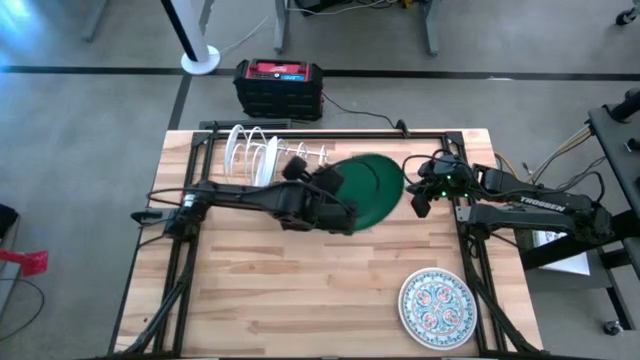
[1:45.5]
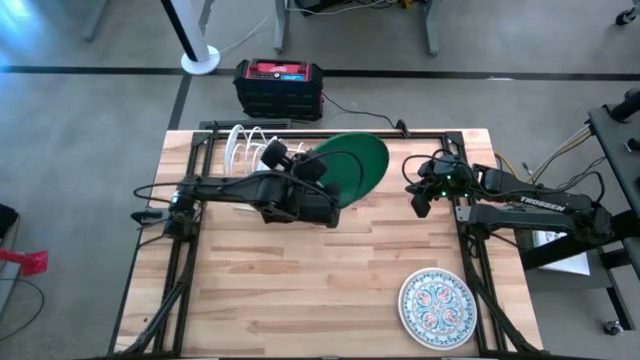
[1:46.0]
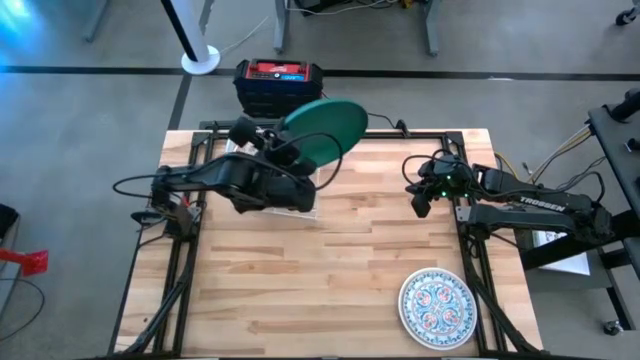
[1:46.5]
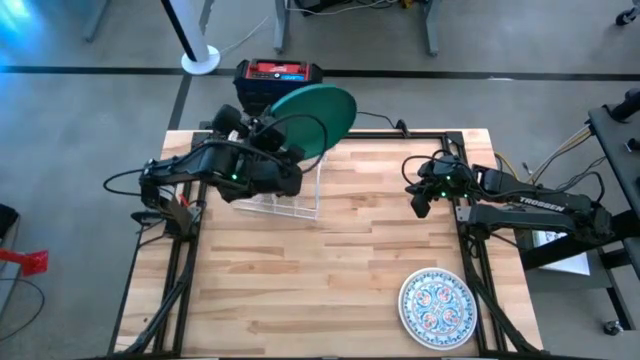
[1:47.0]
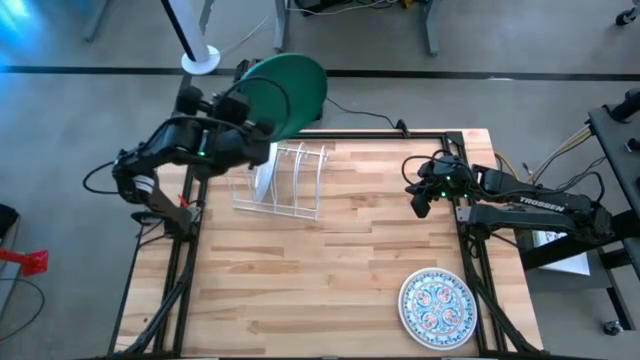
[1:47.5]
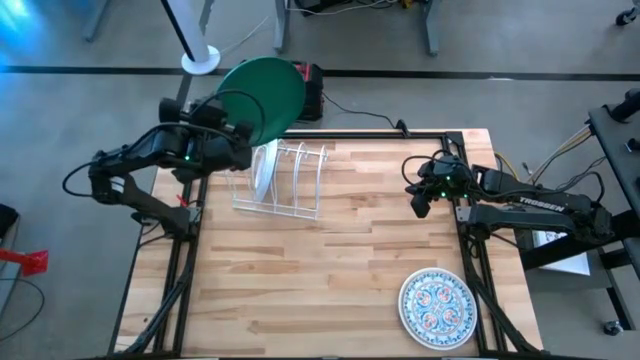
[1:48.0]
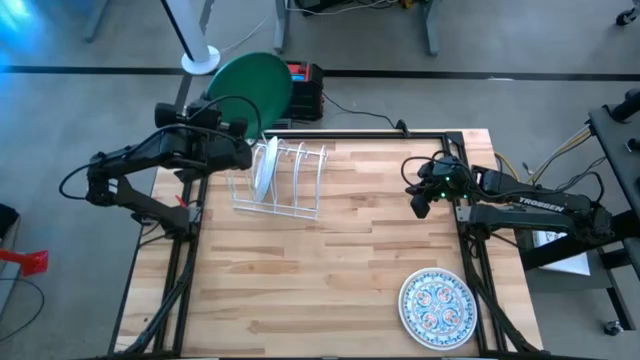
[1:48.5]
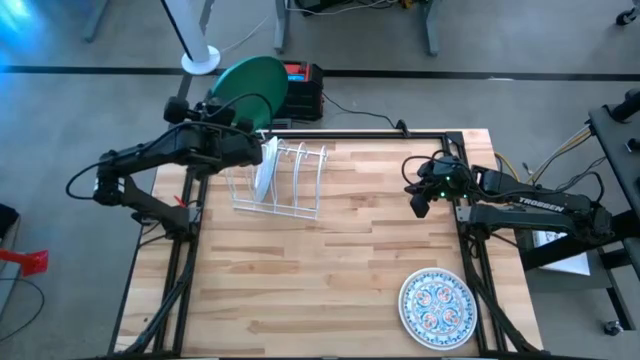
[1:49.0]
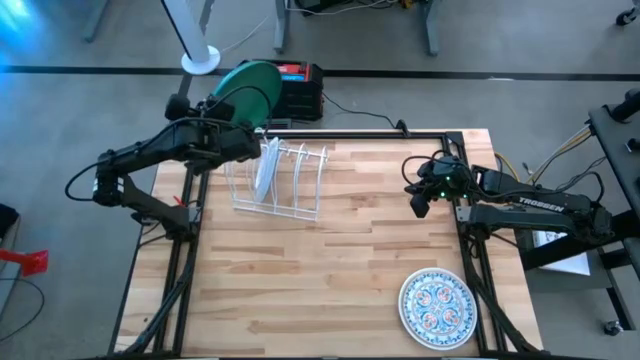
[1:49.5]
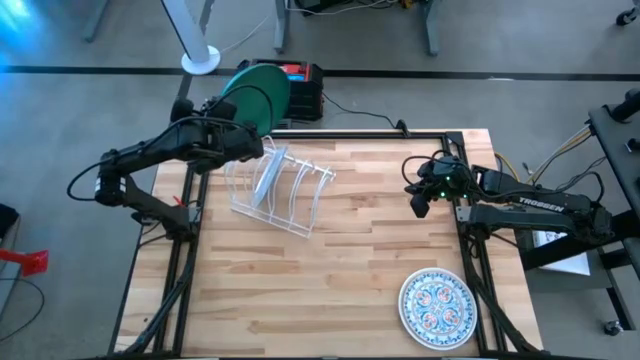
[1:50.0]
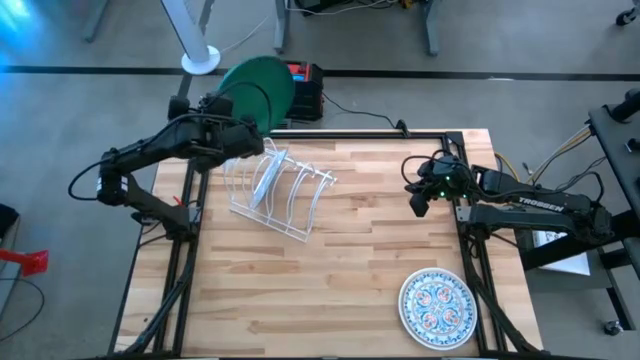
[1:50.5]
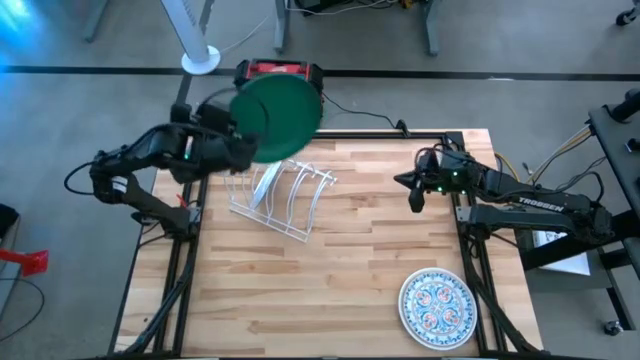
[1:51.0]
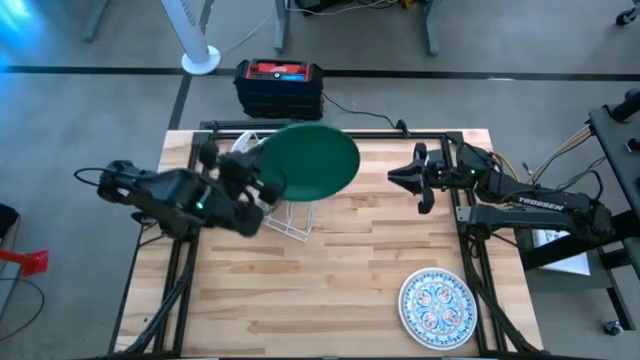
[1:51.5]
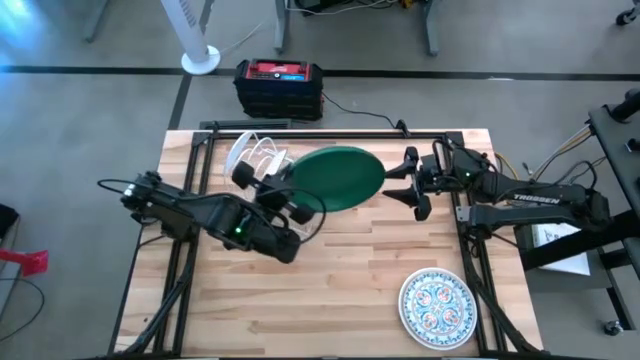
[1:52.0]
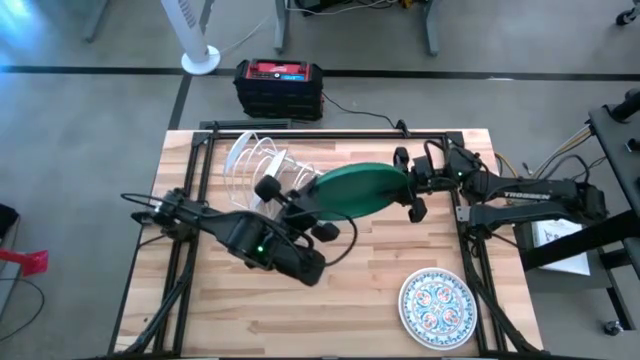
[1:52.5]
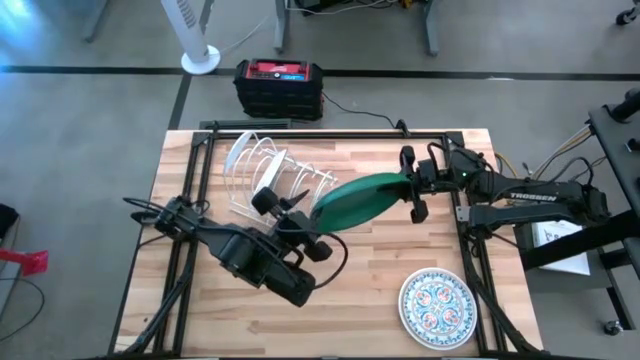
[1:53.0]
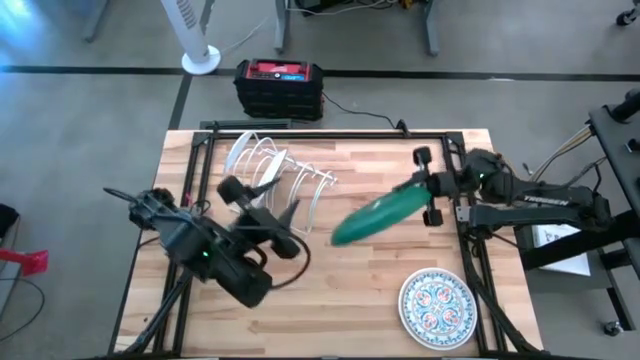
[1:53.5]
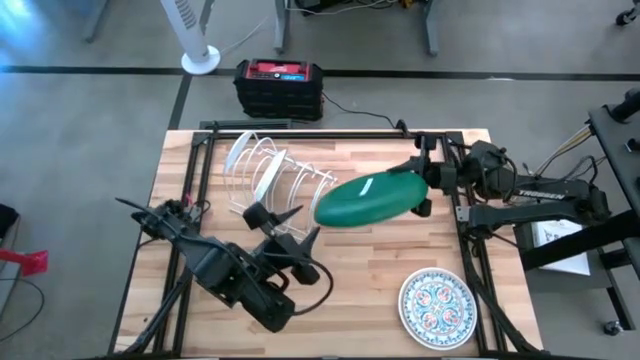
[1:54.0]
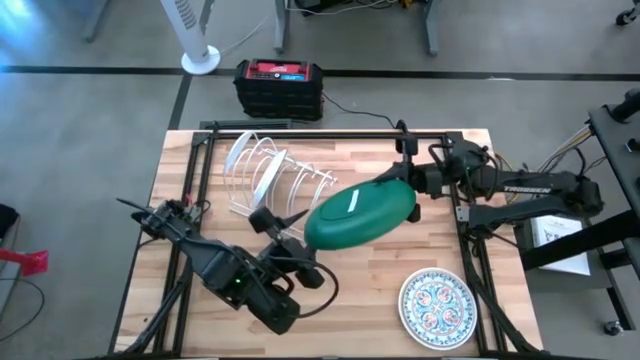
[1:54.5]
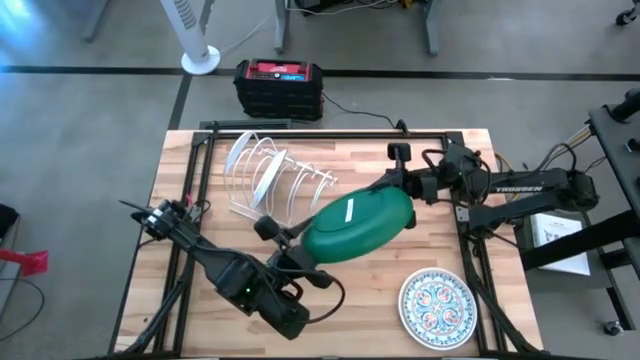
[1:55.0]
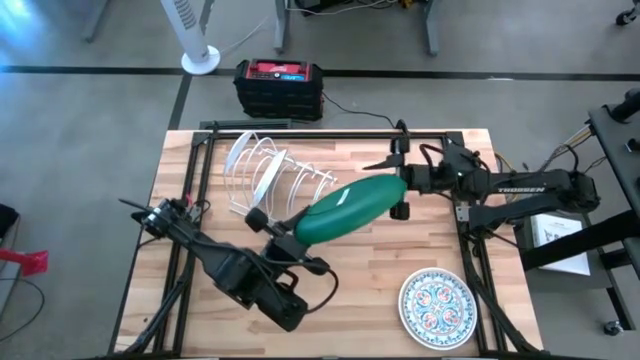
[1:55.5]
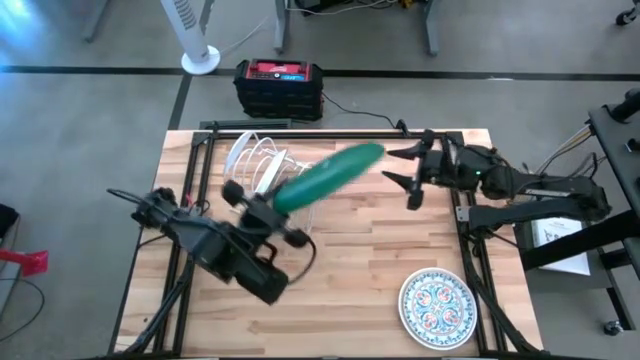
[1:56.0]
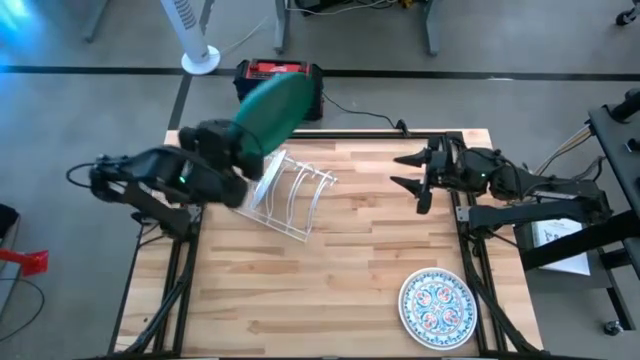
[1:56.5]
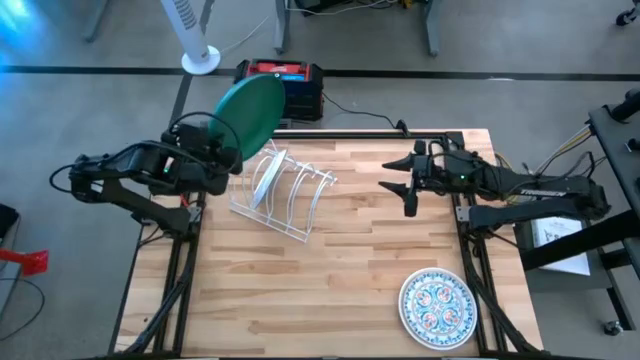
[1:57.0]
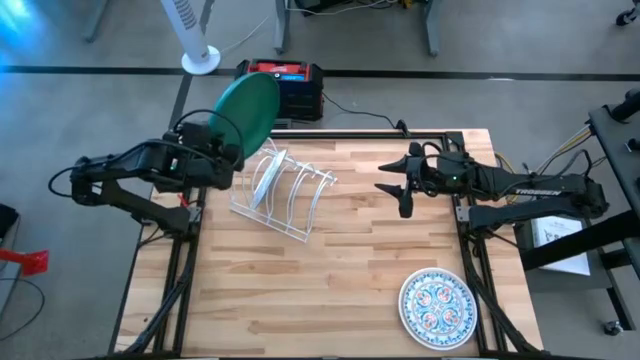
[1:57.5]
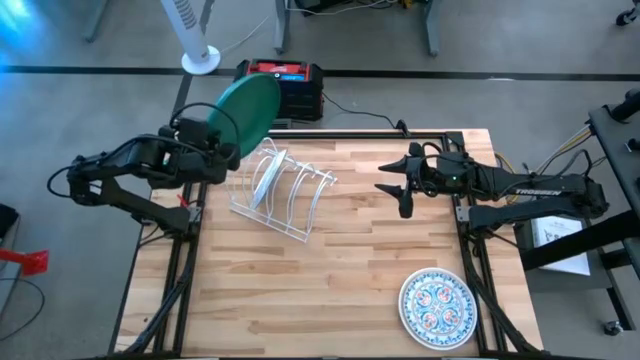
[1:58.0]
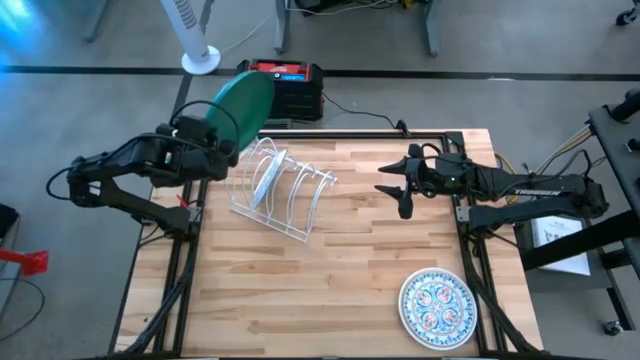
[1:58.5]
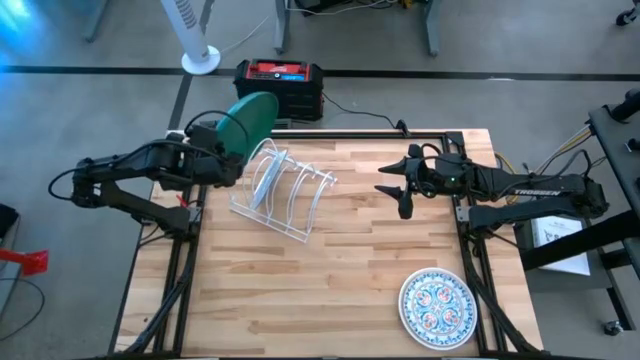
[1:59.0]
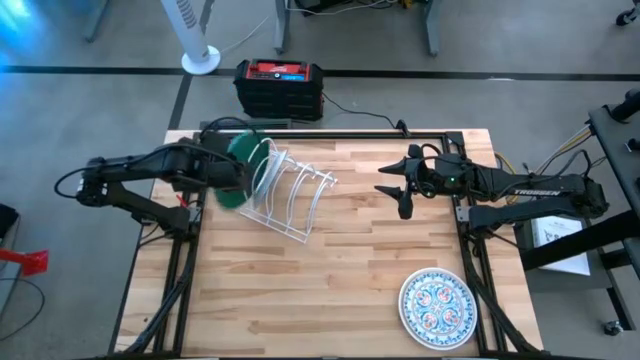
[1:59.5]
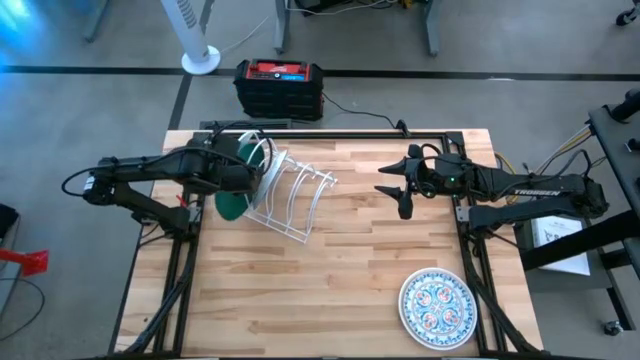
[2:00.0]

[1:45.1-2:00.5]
Task: Sort dishes
Put the green plate in the dish rack

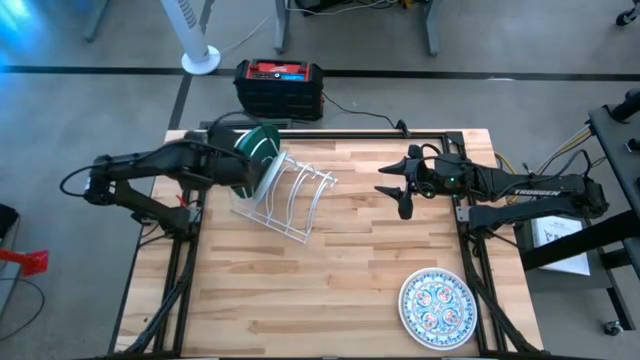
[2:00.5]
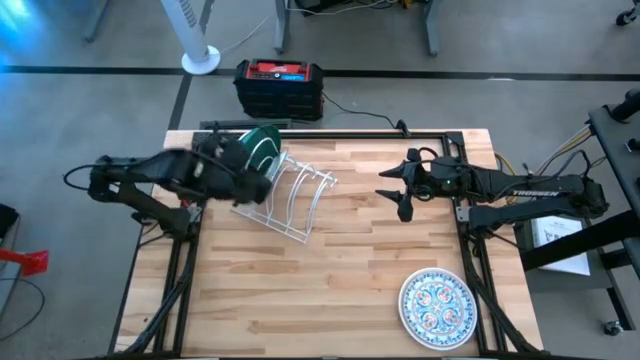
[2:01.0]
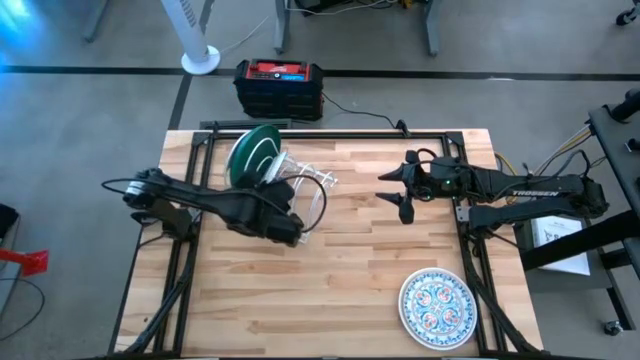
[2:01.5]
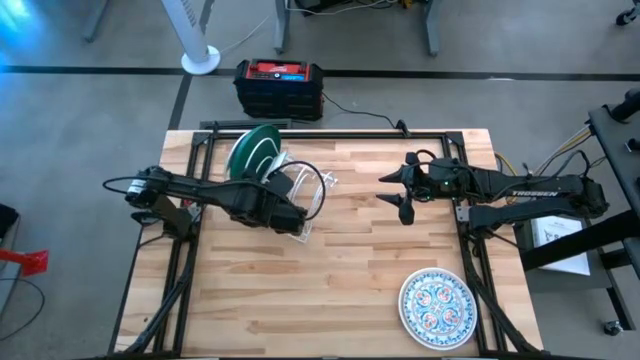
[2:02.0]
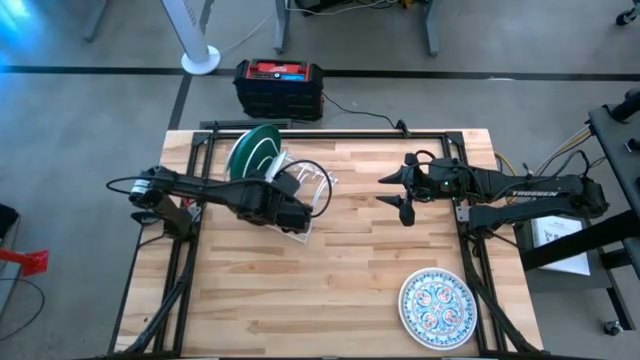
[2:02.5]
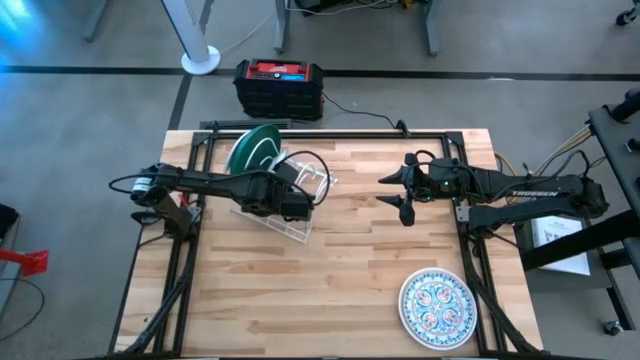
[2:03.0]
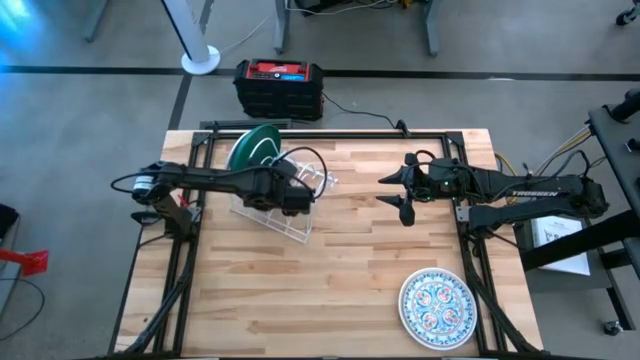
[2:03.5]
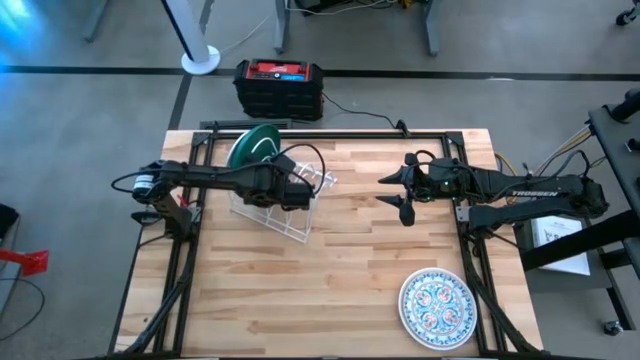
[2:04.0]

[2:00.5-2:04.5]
Adjust the blue patterned plate

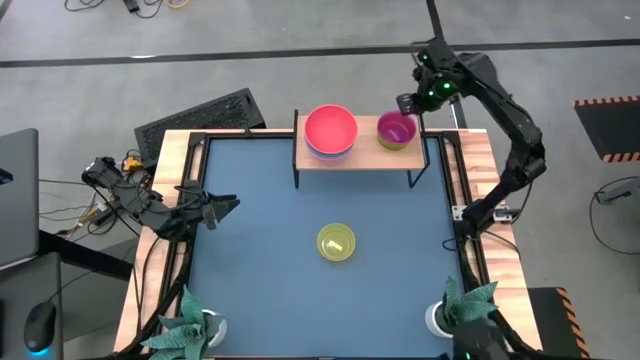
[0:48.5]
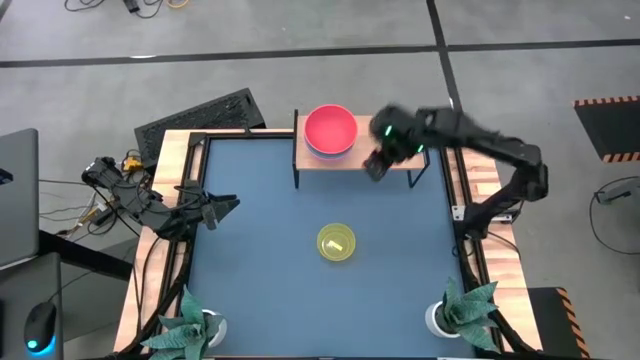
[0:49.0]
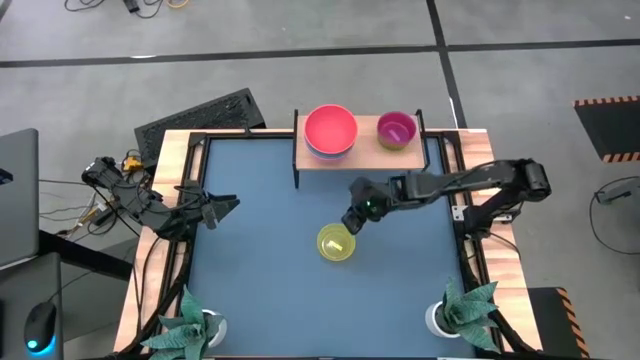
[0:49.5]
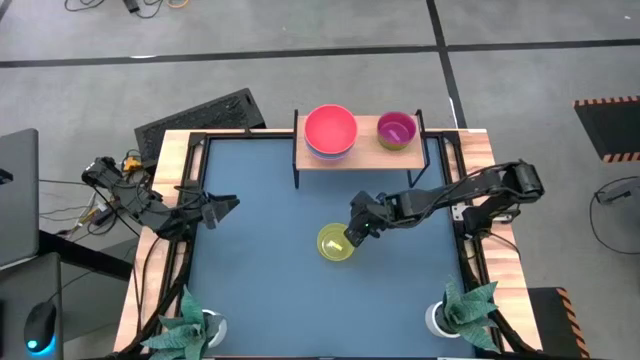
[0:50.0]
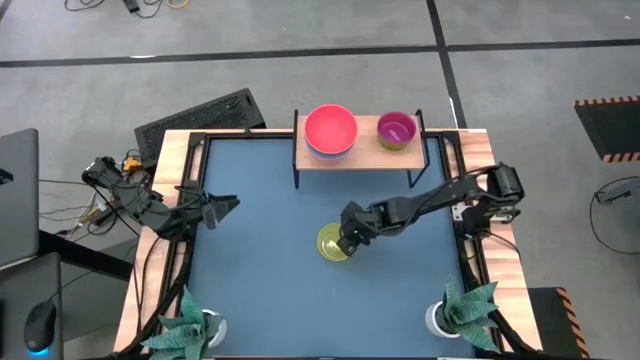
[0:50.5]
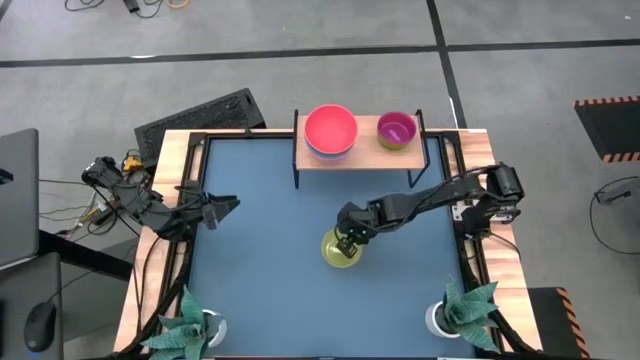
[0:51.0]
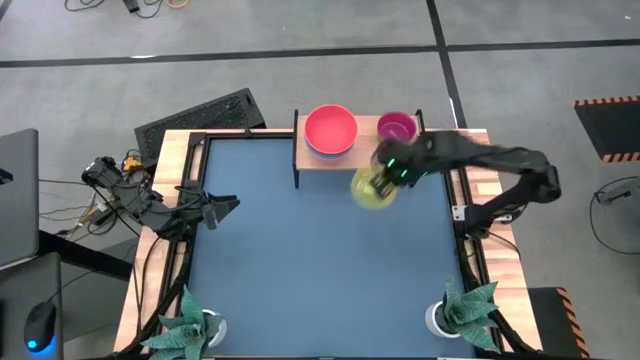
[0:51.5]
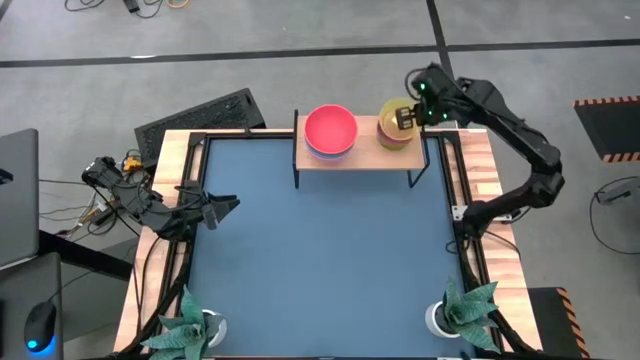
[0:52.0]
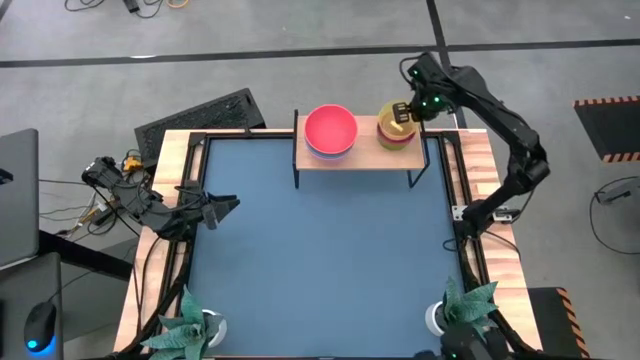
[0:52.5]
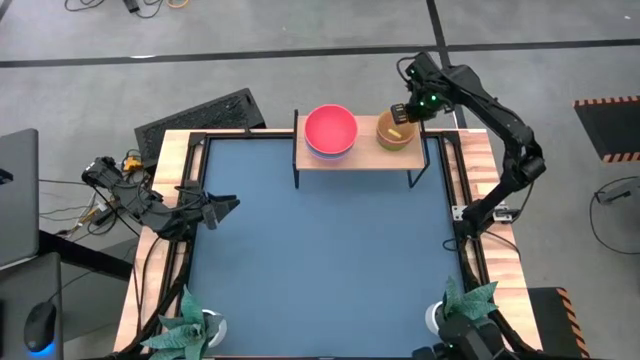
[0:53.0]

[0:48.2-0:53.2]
Task: Place and stack bowls onto a shelf
Stack the small yellow bowl on the small violet bowl on the shelf
